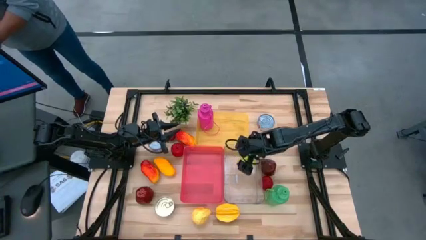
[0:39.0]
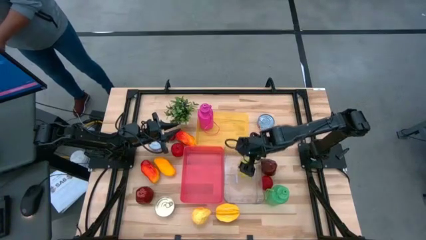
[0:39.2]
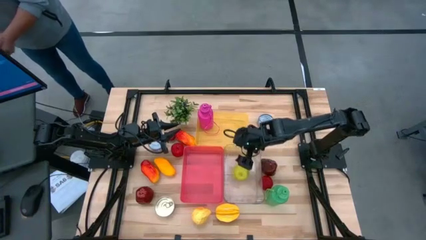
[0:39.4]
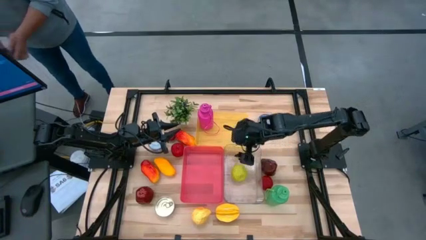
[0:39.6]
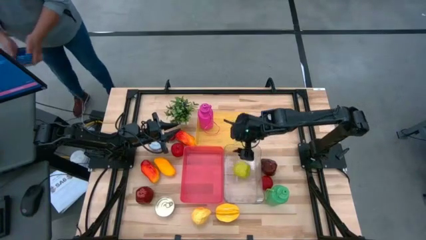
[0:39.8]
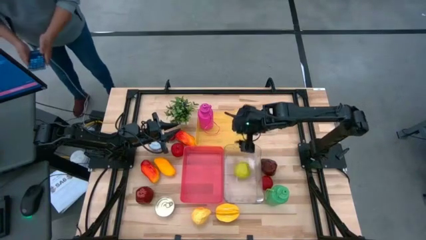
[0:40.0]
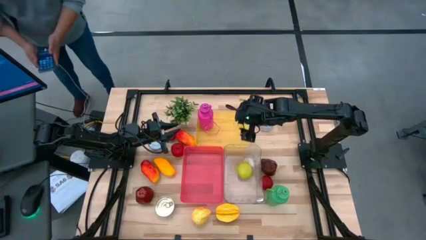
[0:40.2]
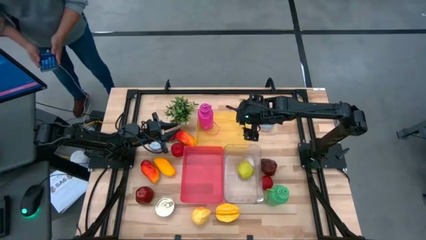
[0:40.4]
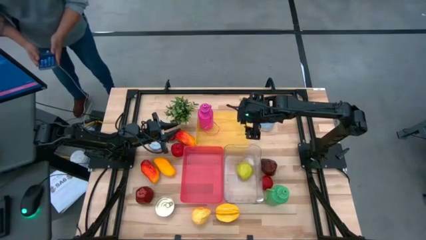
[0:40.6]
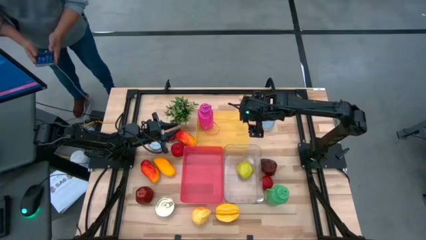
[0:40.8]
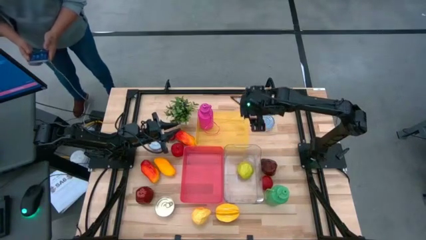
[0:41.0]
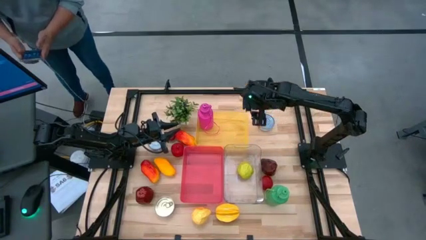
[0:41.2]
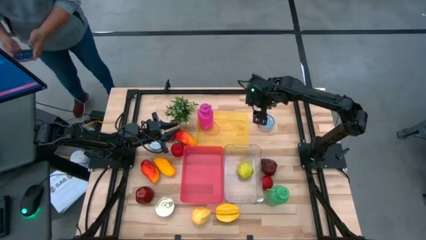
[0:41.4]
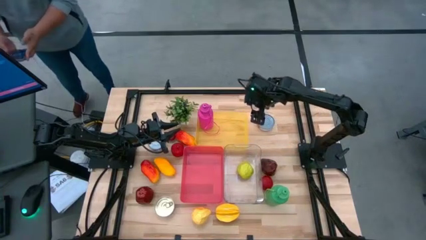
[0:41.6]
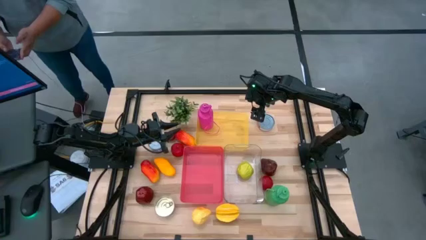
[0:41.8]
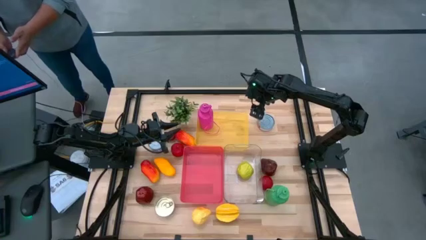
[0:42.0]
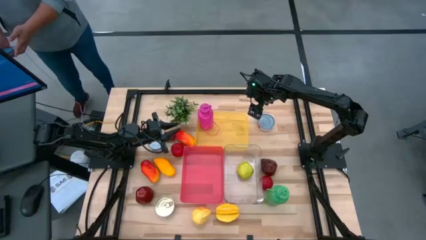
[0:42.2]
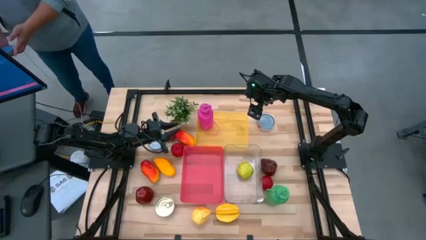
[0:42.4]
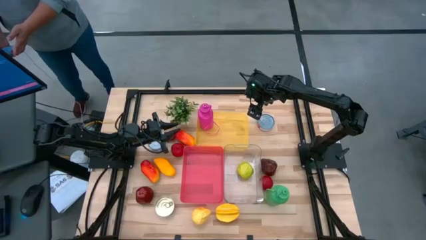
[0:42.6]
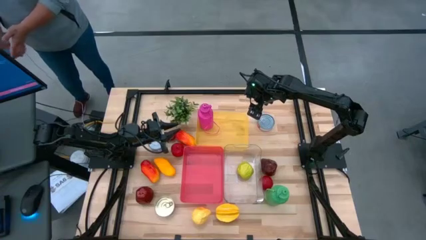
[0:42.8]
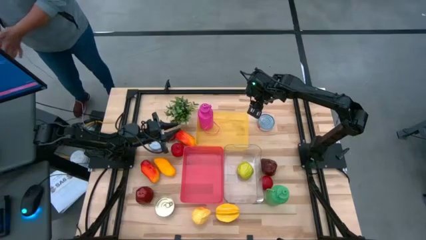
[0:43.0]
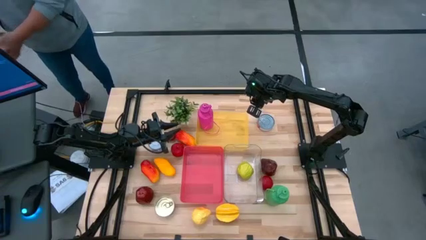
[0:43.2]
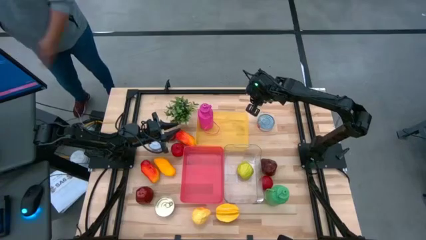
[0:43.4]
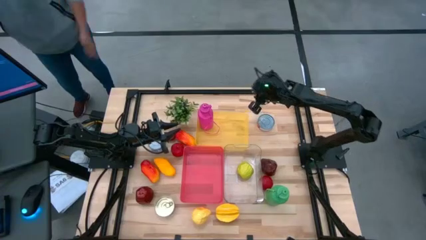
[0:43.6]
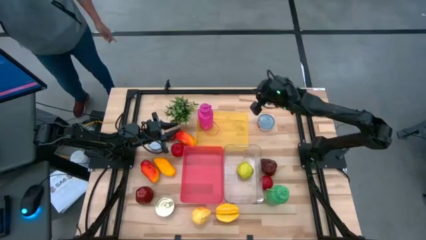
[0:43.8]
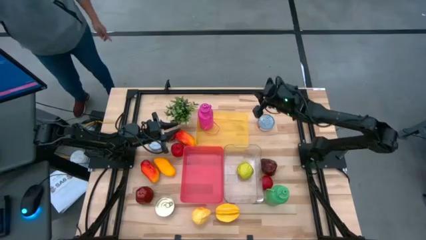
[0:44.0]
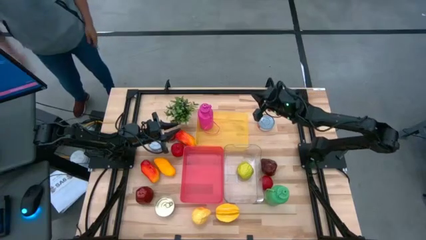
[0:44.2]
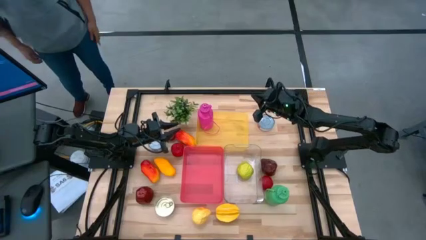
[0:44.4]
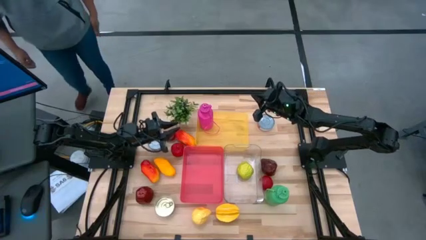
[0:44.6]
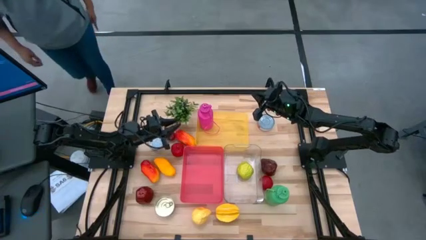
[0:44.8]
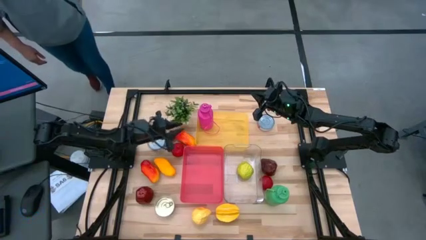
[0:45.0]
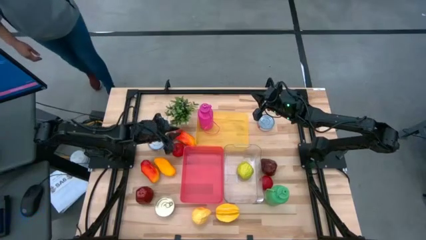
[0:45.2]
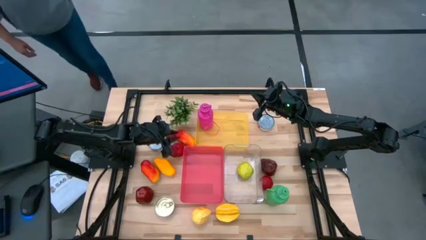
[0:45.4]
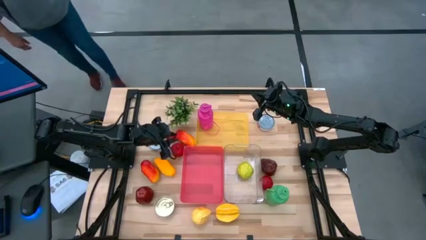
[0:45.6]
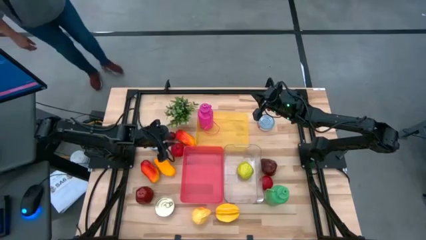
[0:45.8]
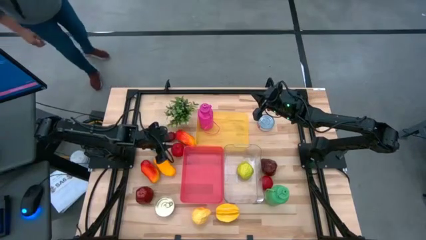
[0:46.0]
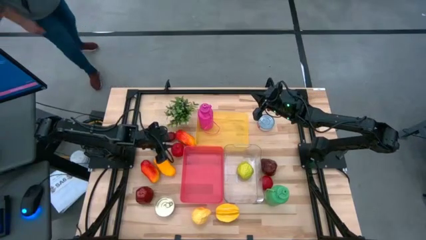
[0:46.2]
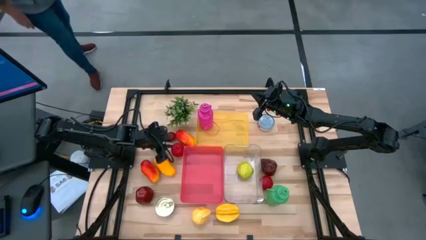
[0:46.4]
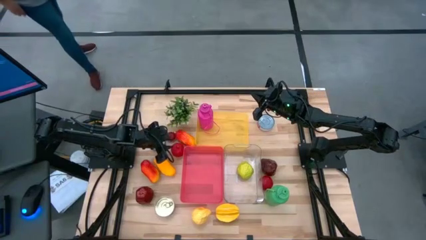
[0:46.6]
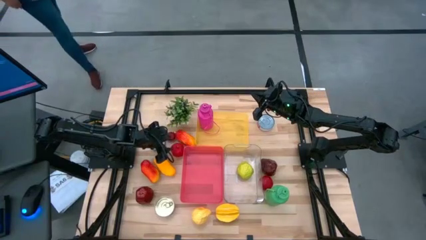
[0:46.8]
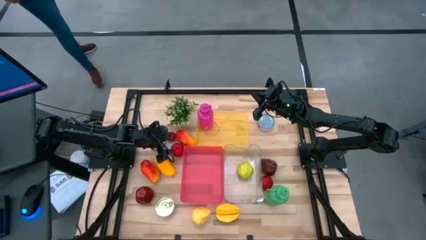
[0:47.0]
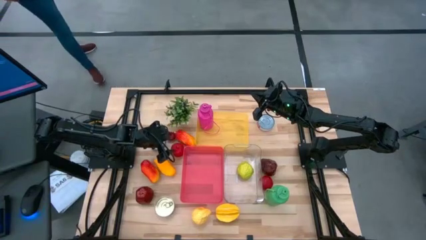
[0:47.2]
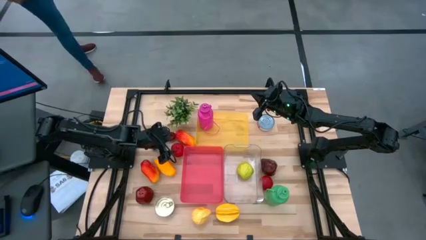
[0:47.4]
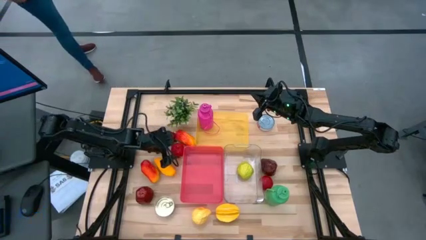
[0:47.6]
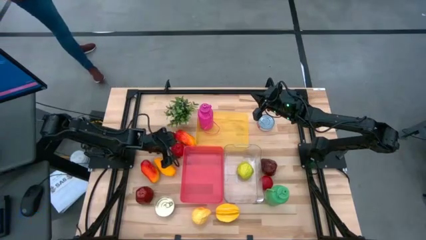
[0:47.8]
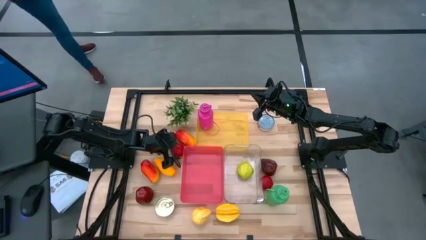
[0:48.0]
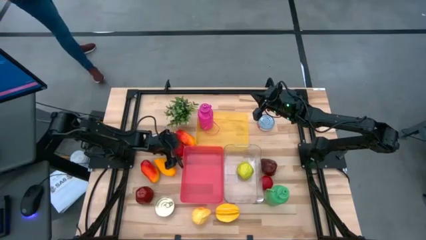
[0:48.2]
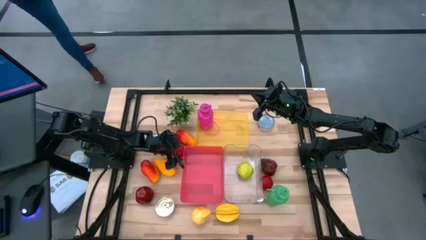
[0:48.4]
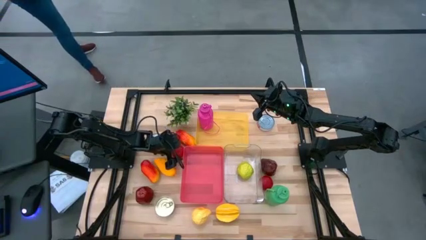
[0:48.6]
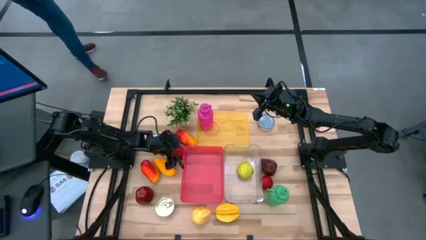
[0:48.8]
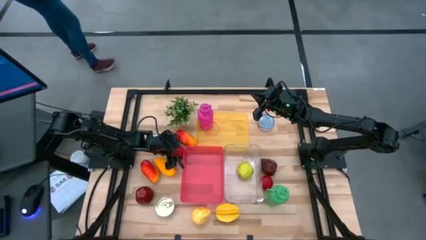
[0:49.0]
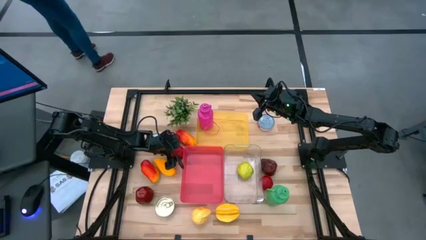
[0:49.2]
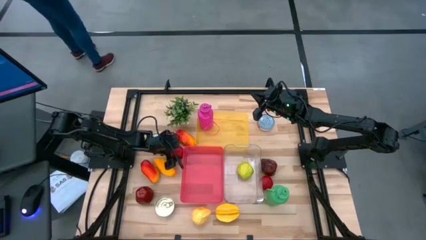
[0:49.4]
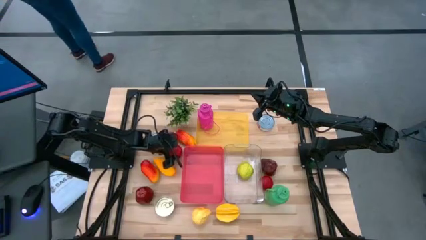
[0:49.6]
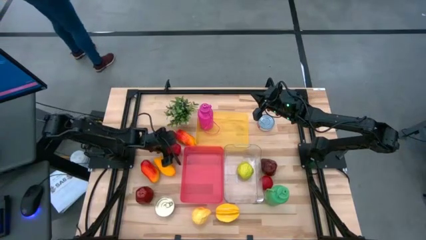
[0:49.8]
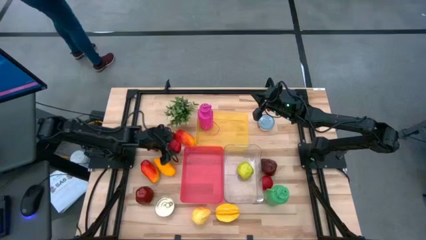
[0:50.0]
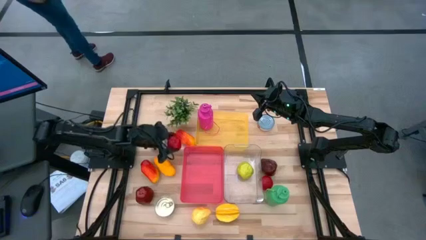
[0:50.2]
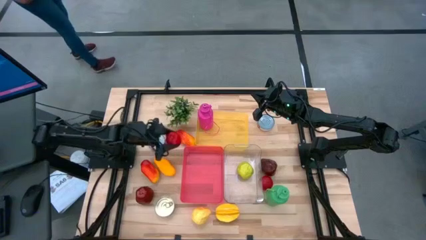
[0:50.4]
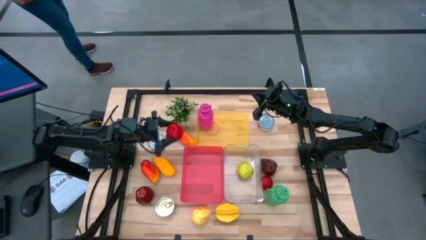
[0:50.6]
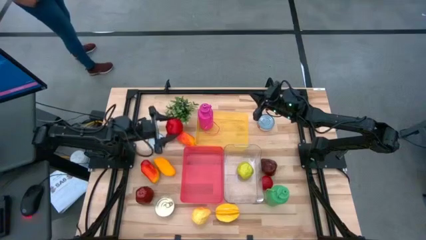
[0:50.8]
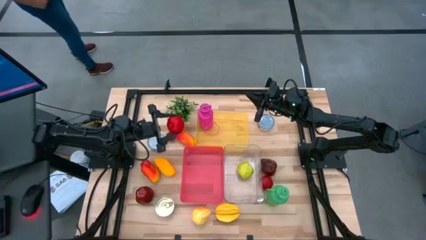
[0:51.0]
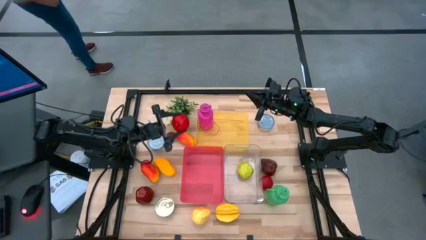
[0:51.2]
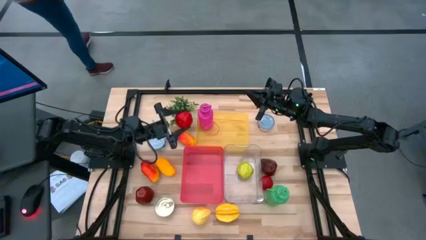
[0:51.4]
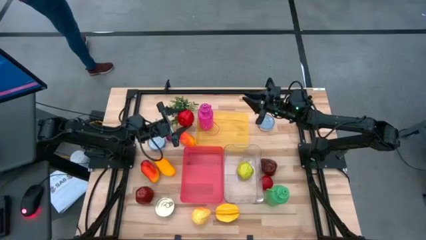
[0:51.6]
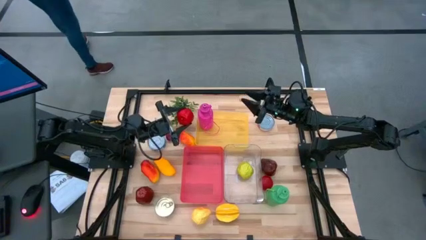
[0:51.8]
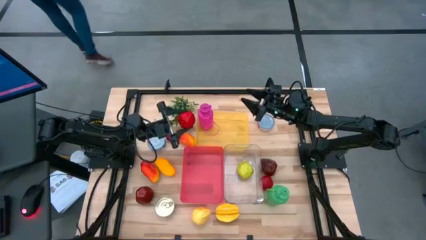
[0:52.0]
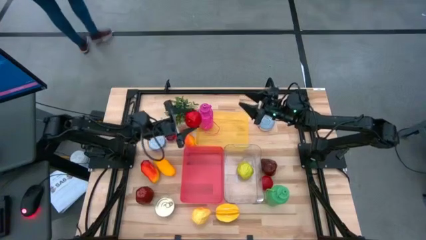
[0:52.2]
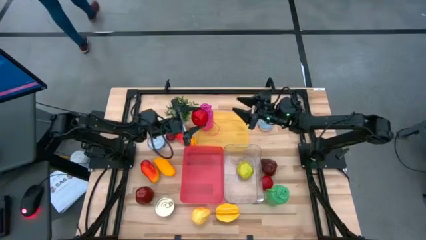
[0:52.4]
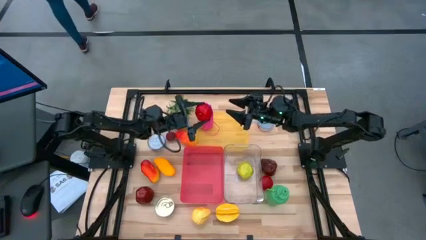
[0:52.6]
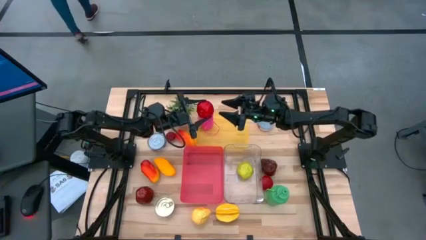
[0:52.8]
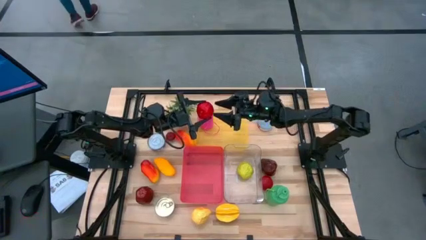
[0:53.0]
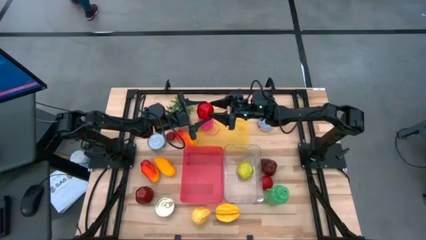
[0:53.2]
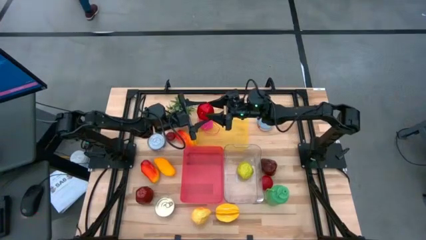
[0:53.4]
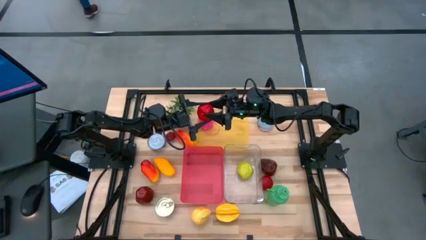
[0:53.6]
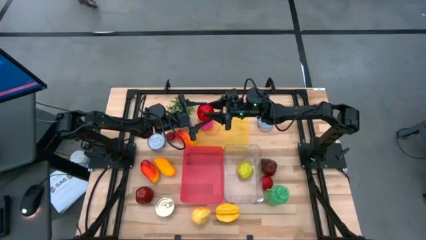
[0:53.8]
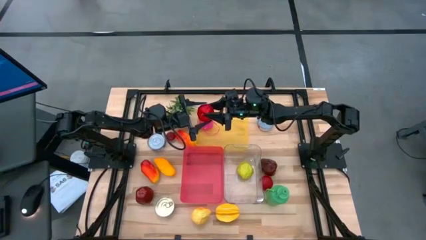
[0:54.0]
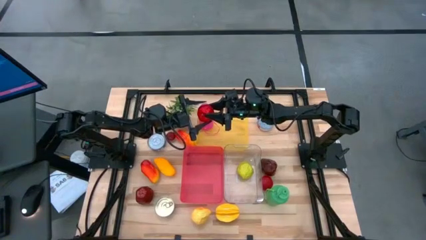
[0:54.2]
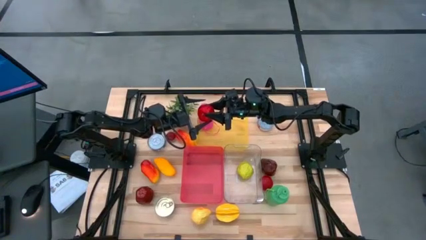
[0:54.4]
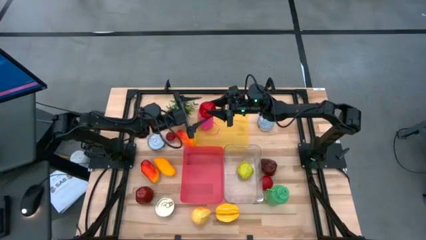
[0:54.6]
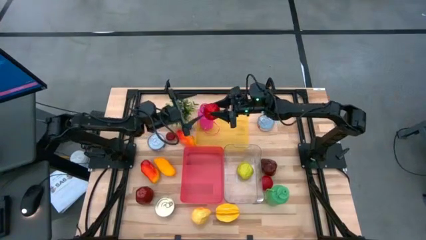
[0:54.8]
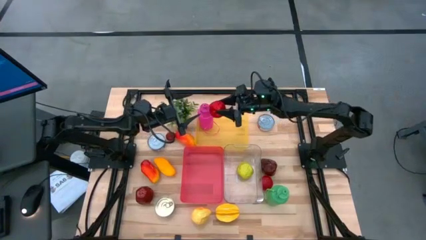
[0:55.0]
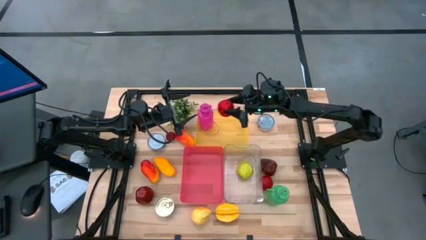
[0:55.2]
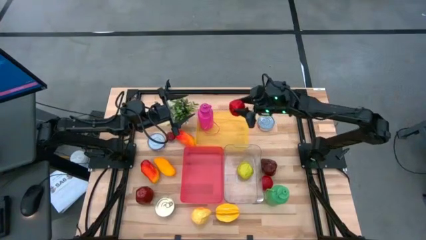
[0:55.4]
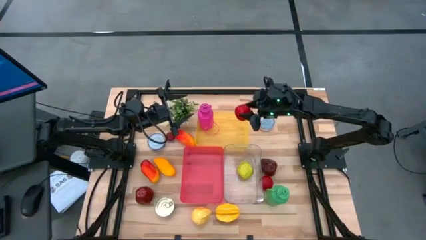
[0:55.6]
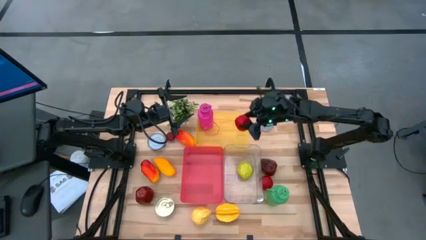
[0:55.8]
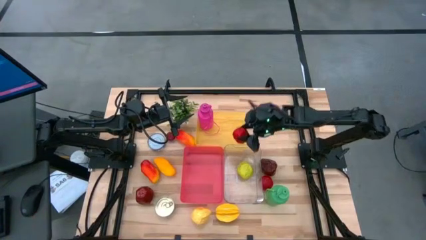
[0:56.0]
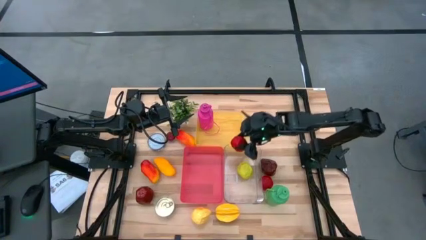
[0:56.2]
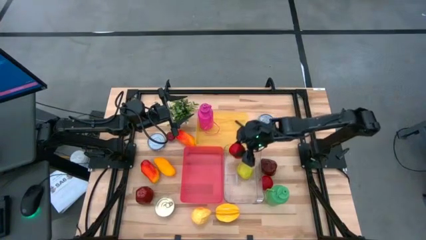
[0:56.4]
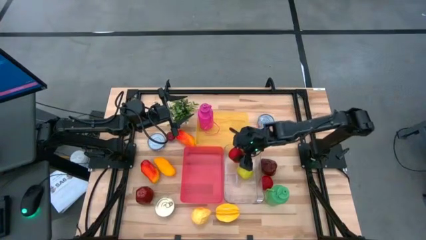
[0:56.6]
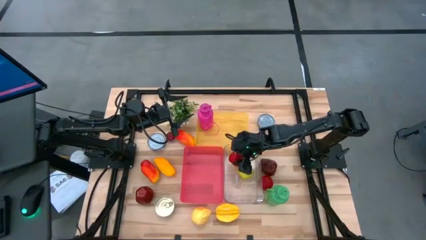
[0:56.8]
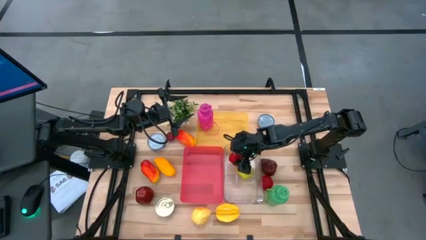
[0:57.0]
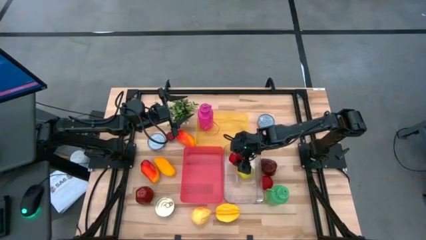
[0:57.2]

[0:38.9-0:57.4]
Task: Pick & Place Food Item
Put the red apple into the transparent bin
